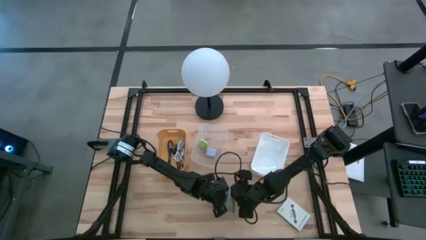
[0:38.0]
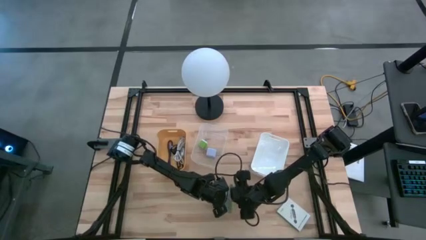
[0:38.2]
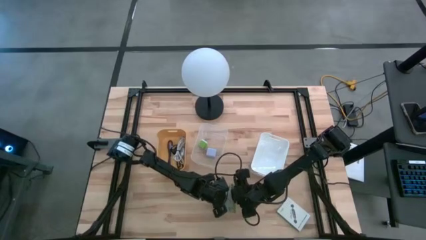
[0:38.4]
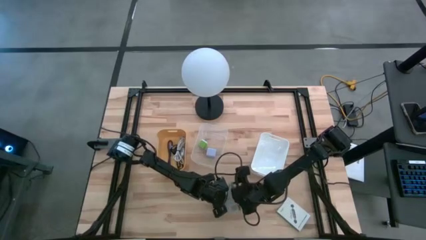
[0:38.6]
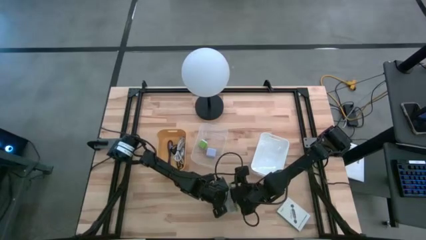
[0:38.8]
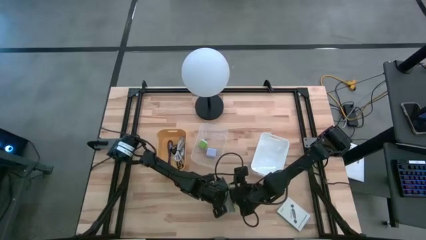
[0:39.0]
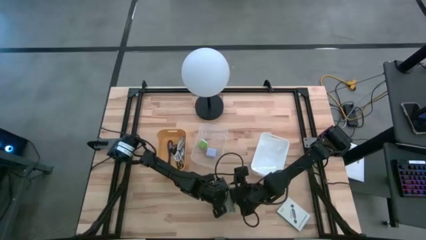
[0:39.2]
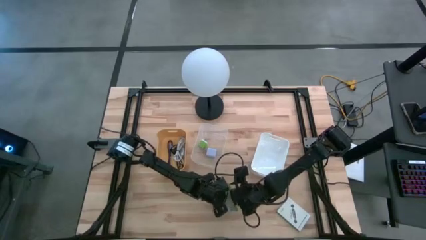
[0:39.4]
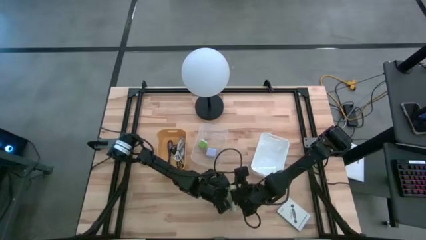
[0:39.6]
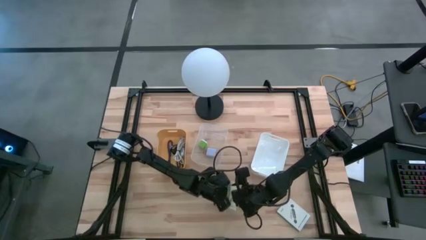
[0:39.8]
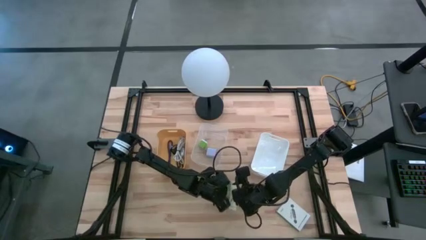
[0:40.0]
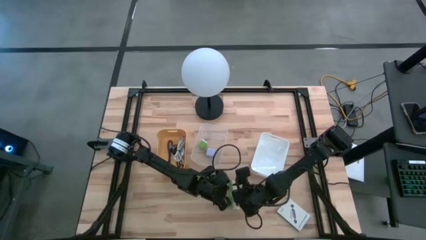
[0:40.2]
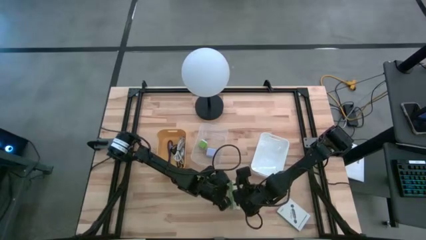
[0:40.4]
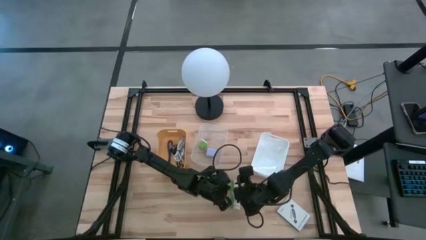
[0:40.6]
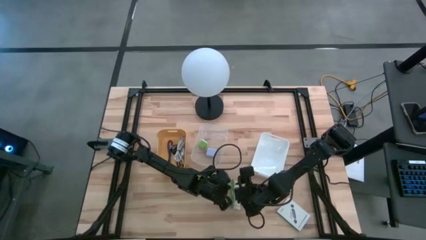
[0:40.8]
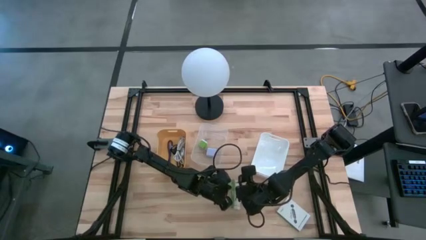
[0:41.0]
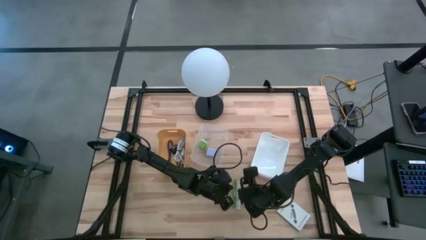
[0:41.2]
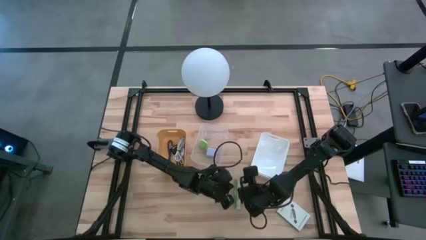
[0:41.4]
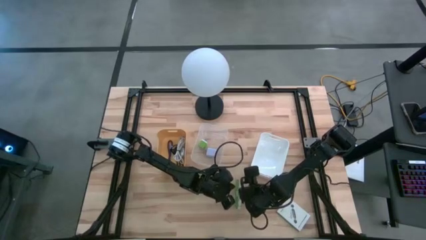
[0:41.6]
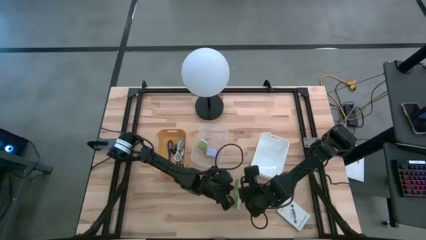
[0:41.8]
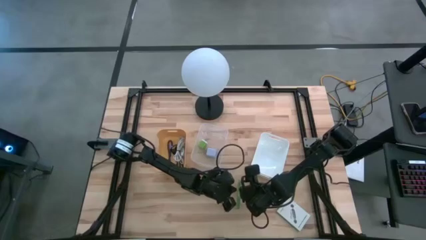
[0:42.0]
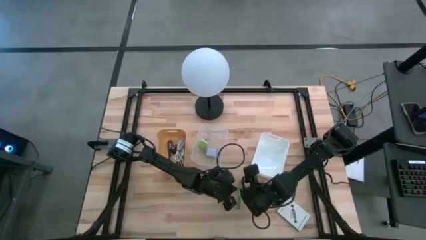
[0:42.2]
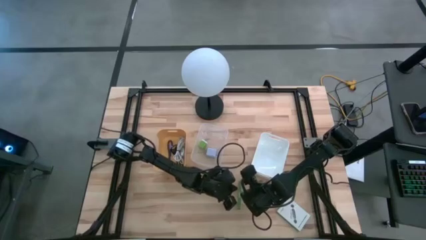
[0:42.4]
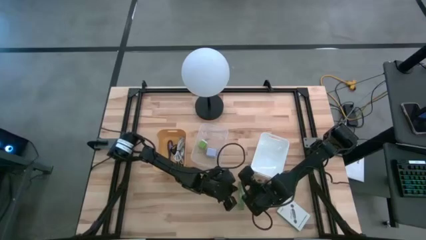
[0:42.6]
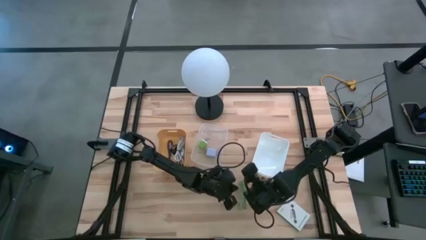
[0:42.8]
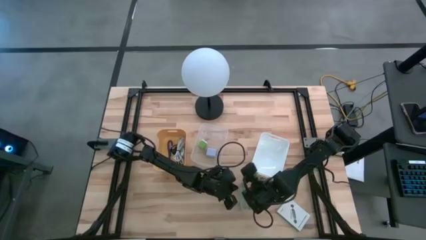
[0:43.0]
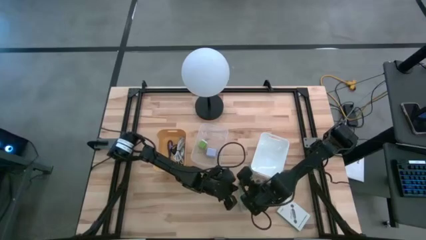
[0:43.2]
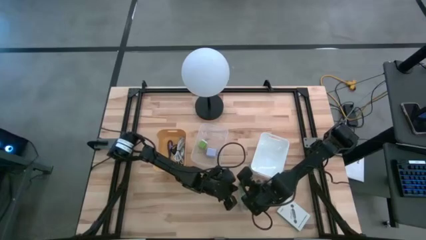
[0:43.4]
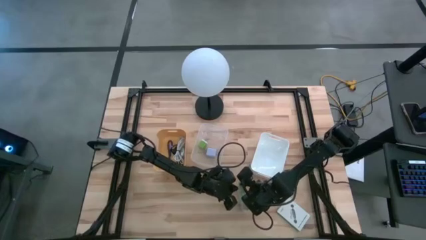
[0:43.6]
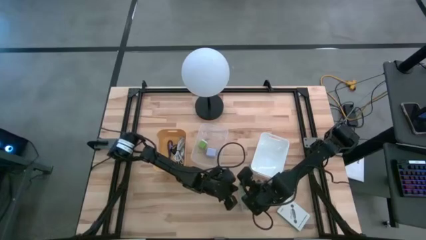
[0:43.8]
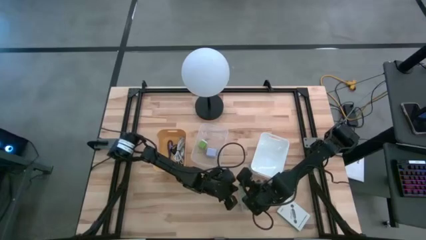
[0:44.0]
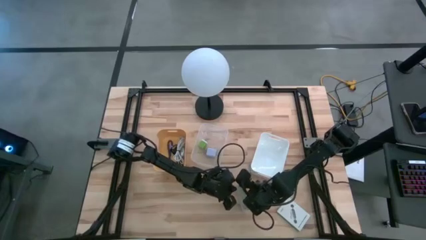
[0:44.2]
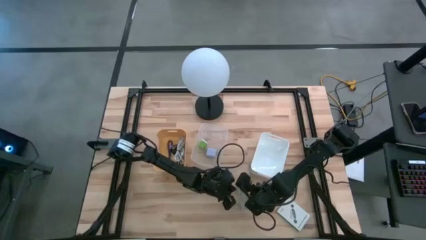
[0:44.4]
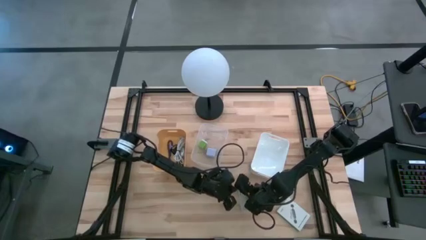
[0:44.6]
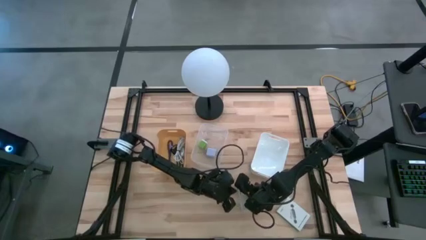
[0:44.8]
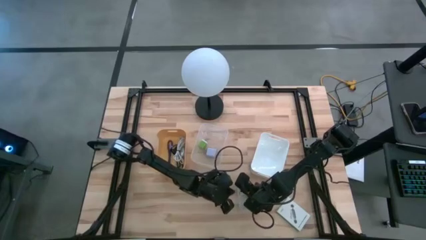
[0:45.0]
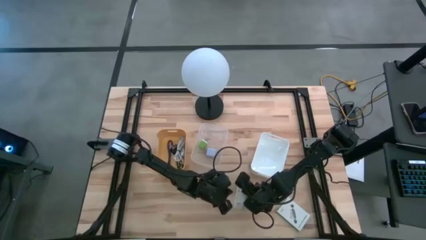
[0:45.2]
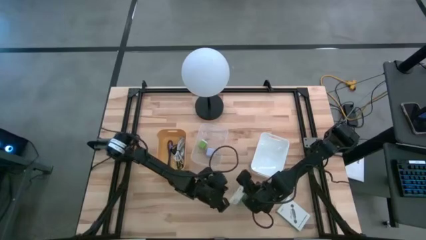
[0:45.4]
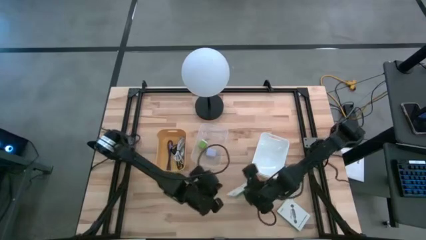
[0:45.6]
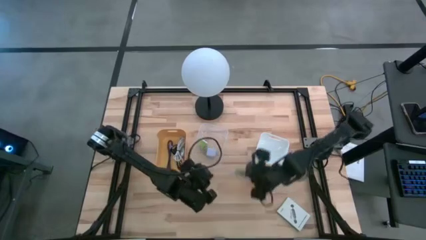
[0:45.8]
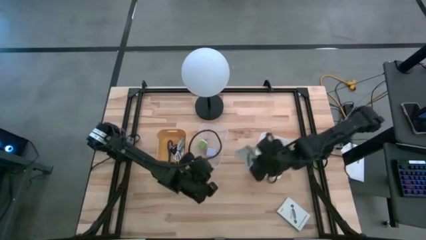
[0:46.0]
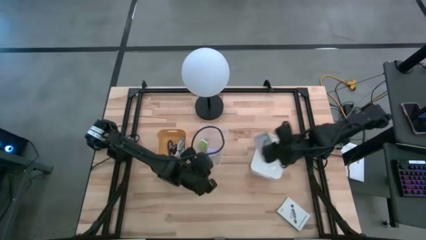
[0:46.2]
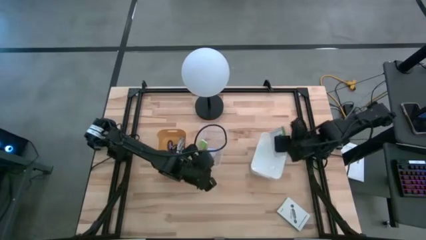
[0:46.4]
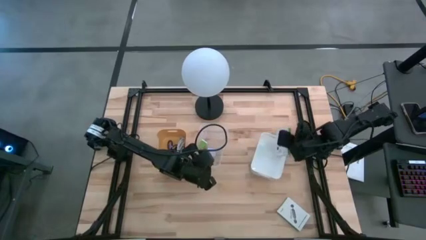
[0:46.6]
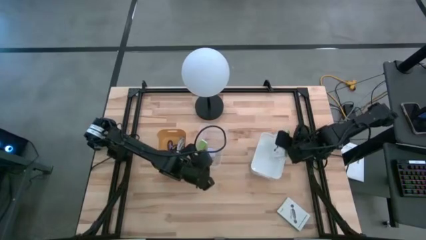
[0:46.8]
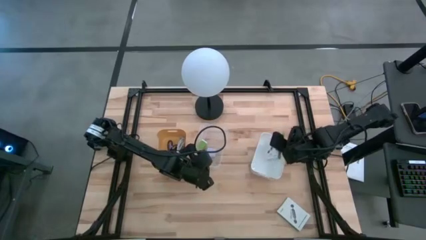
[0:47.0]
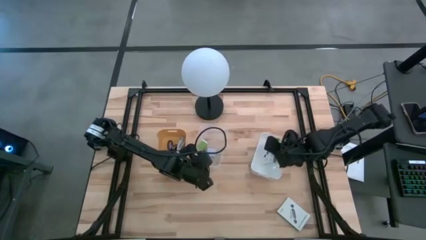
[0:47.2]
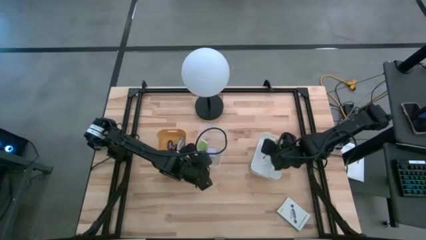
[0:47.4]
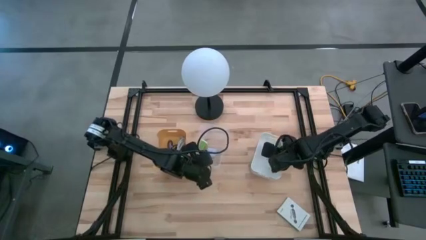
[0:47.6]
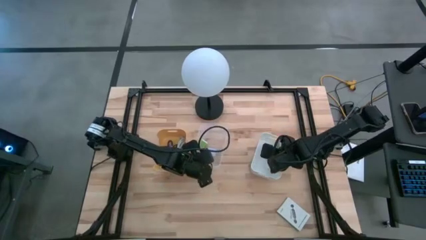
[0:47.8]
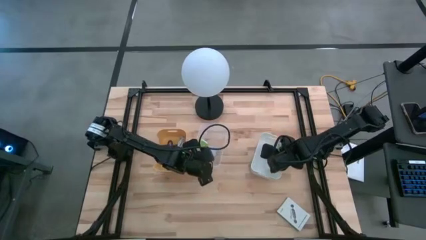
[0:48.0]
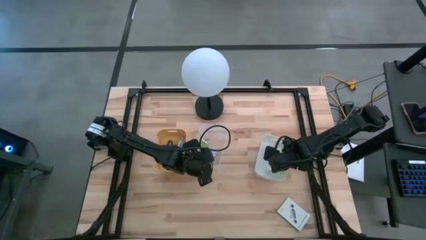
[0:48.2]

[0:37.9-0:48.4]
Task: Pick and place items into bin
Put the left card reader box into the white bin

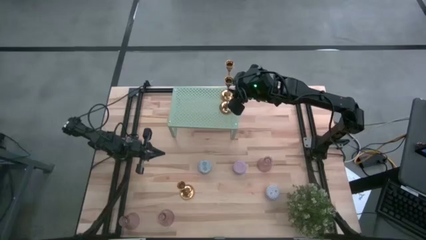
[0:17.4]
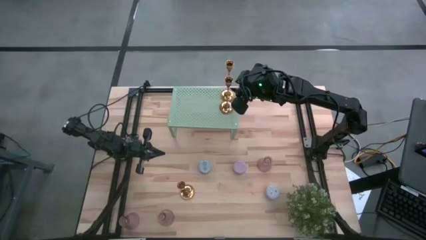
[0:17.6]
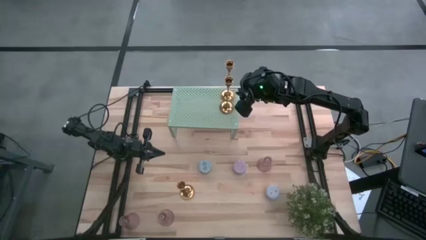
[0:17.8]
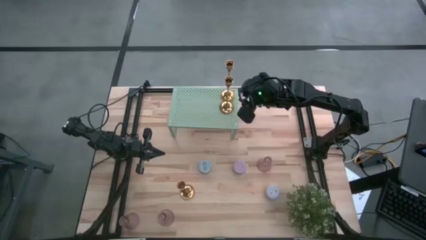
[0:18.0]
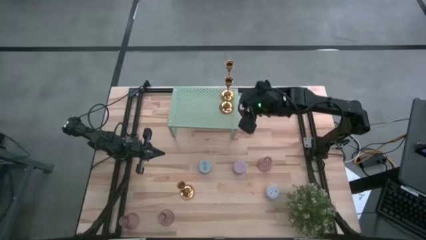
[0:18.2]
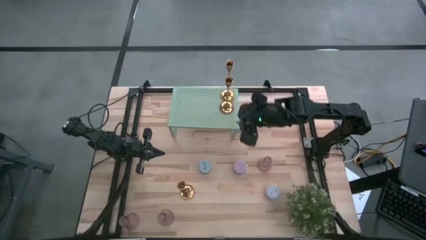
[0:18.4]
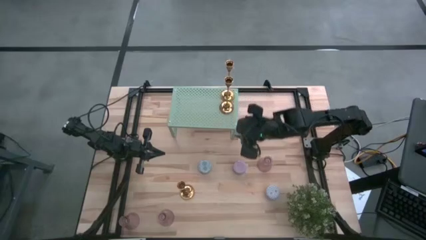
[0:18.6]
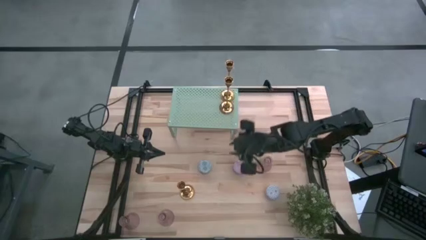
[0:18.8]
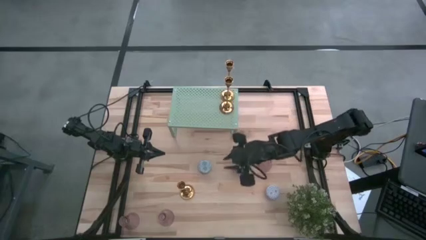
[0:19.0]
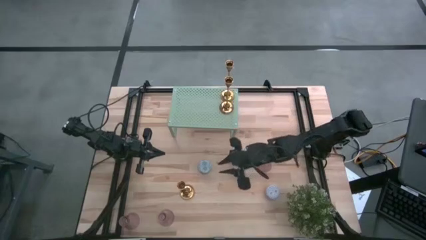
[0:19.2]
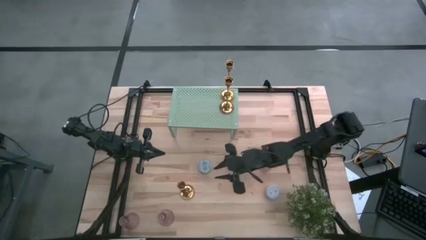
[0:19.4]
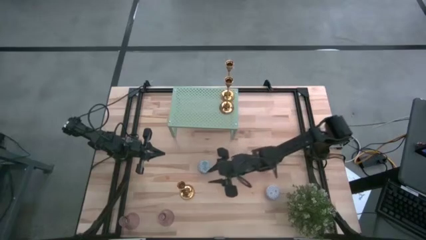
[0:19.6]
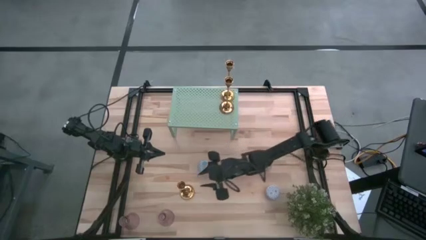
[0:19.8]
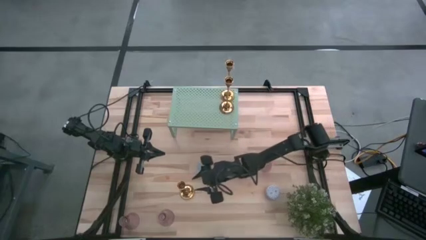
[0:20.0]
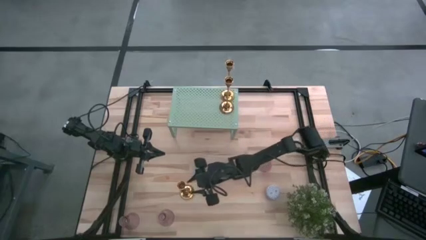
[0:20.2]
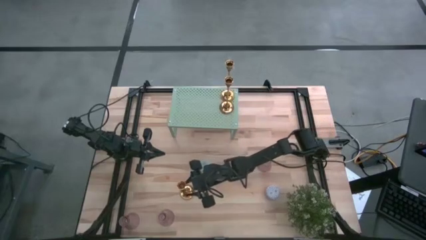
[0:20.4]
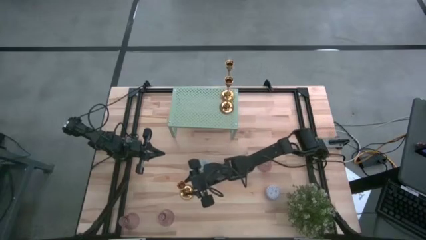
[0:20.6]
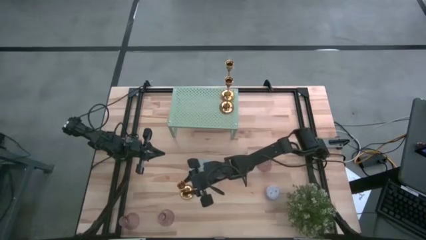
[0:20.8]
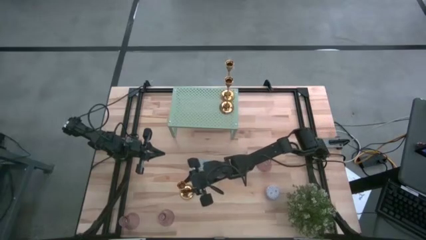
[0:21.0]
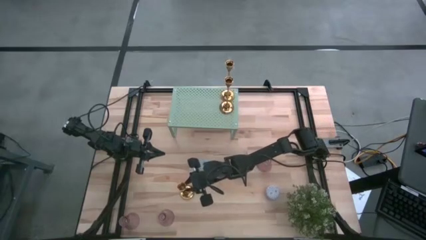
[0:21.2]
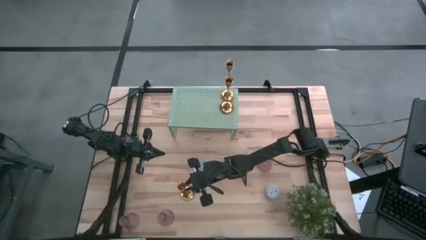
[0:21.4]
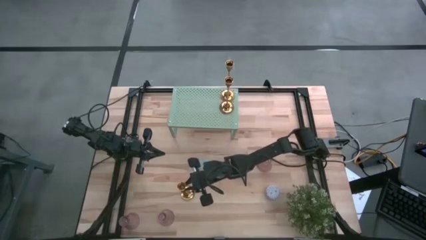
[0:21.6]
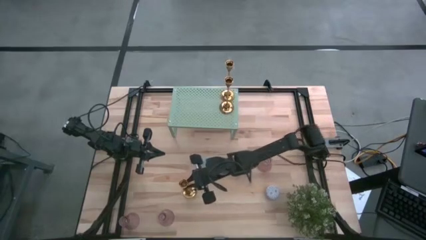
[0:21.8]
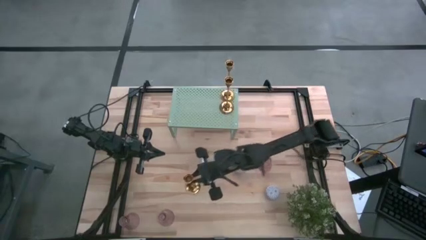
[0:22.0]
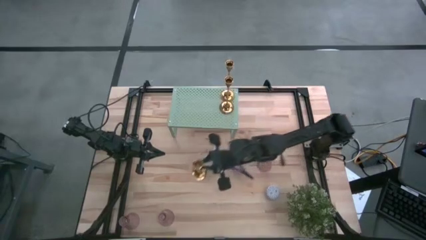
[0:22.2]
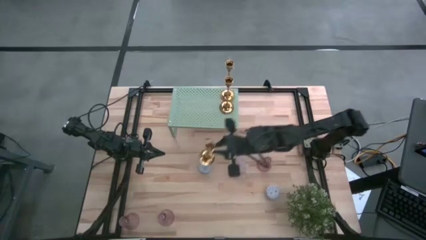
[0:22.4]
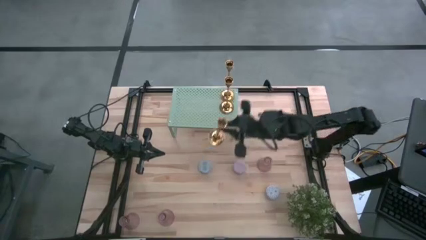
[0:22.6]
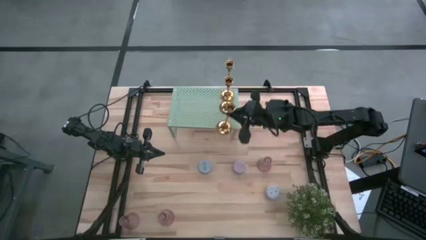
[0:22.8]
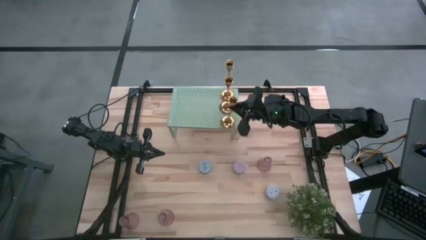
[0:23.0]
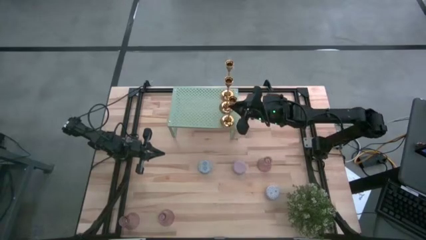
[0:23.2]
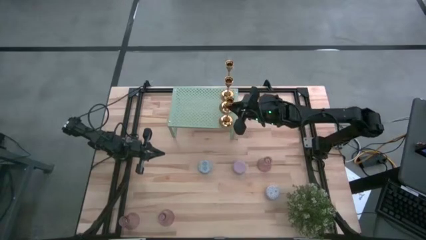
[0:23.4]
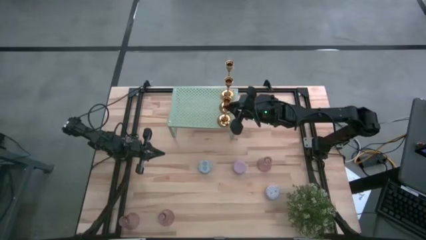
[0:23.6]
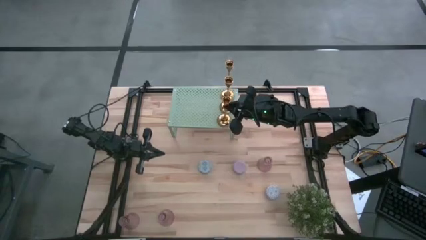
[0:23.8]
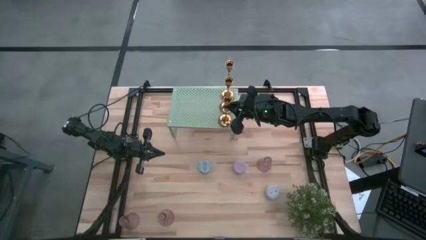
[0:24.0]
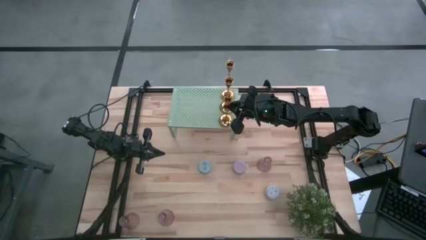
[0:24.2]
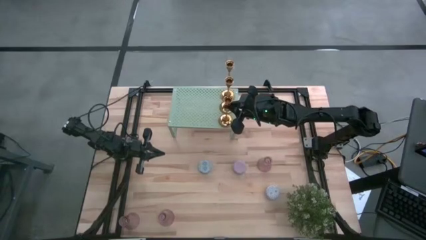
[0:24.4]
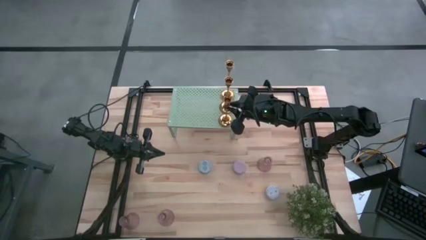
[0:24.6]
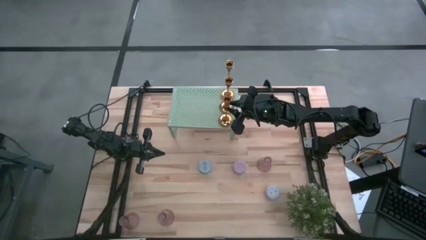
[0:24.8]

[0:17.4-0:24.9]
Task: Pick & Place candle stick holders
Put the gold candle holder on the shelf aligned with the gold candle holders
